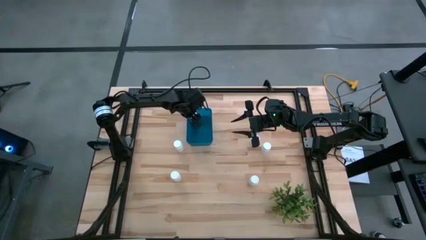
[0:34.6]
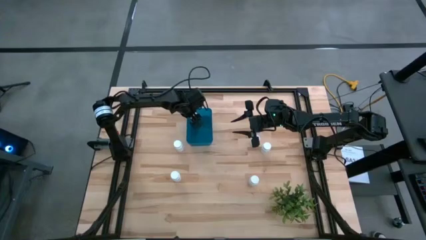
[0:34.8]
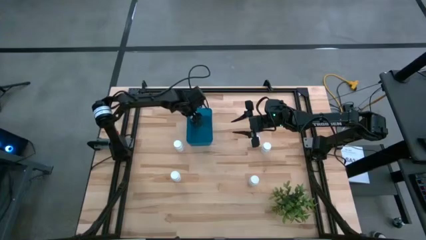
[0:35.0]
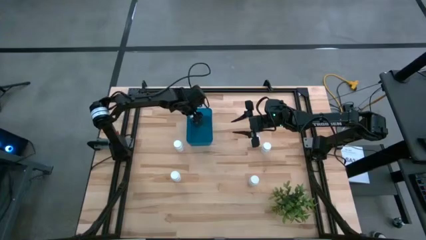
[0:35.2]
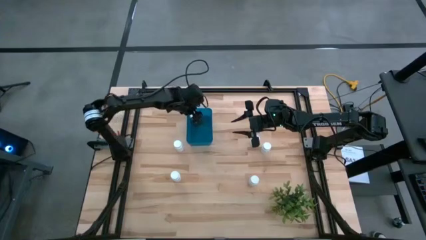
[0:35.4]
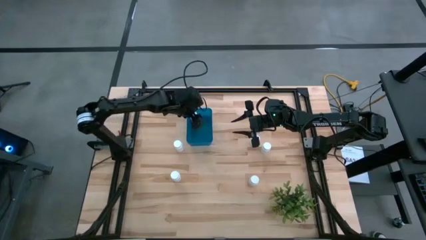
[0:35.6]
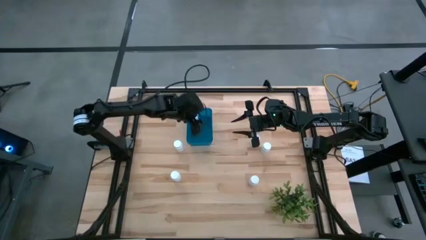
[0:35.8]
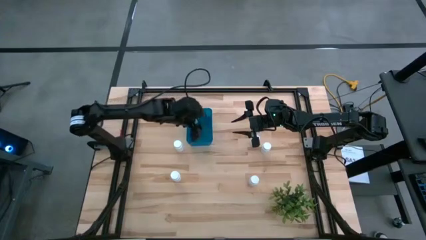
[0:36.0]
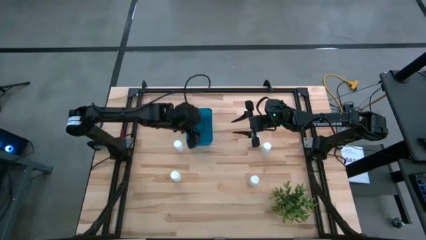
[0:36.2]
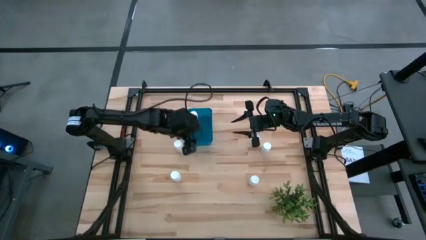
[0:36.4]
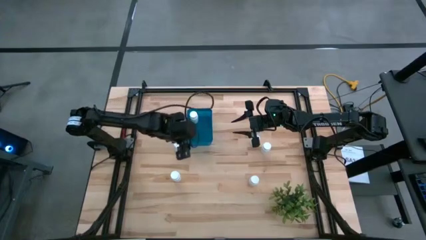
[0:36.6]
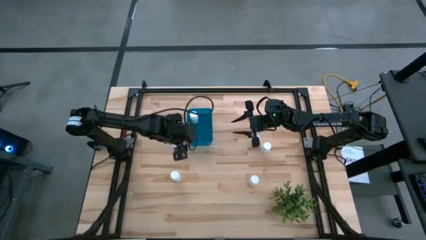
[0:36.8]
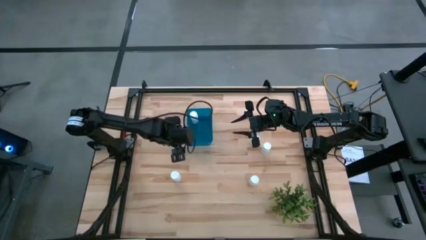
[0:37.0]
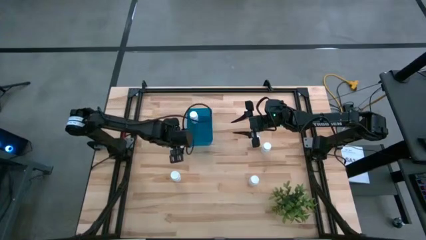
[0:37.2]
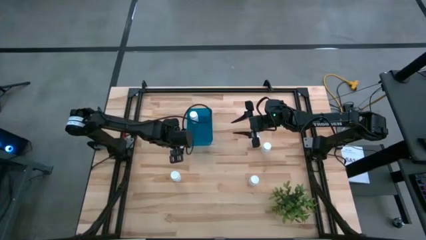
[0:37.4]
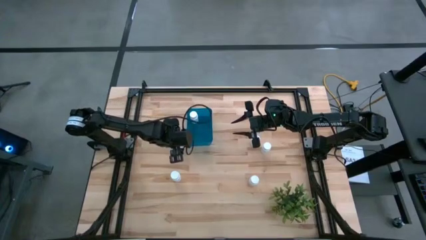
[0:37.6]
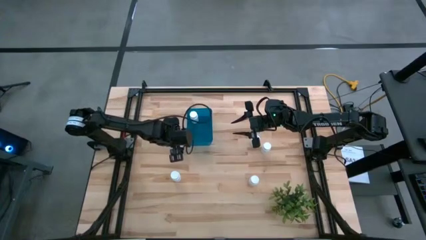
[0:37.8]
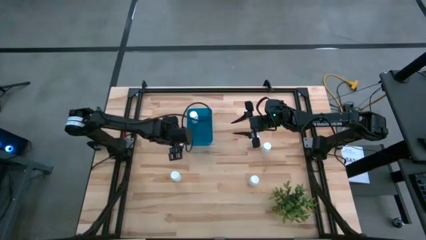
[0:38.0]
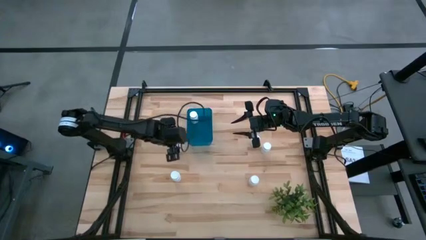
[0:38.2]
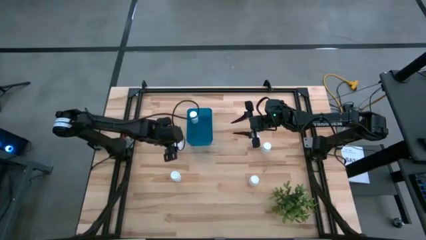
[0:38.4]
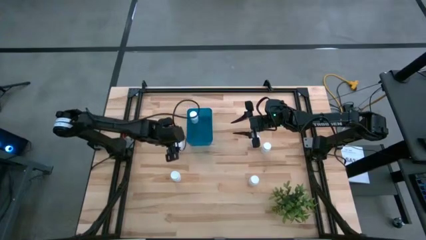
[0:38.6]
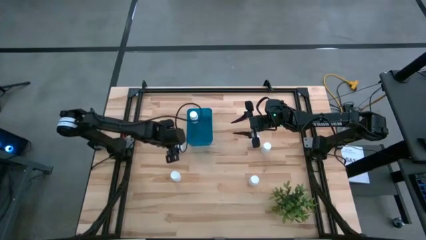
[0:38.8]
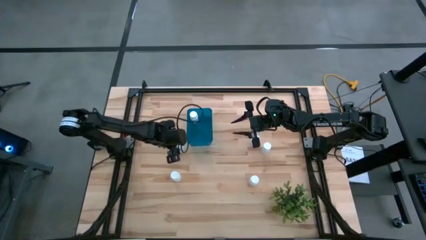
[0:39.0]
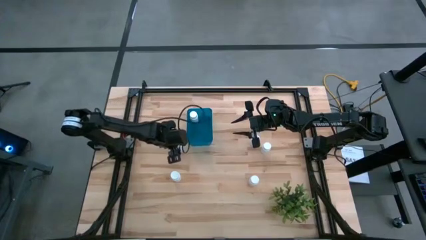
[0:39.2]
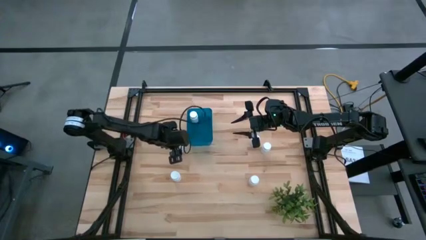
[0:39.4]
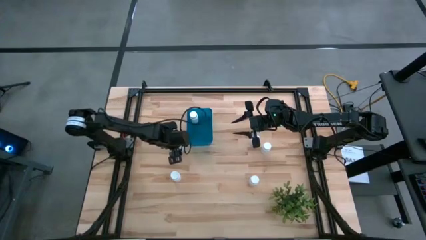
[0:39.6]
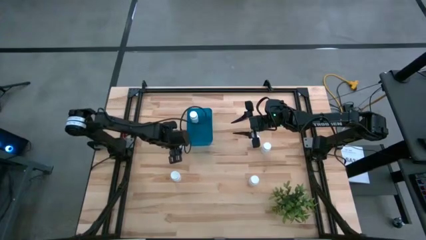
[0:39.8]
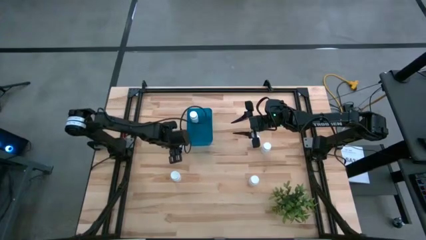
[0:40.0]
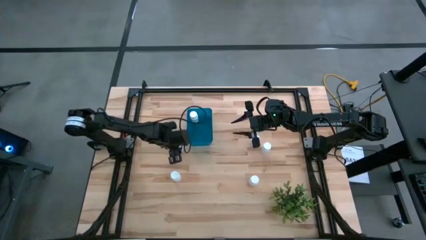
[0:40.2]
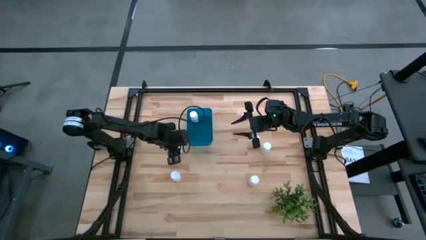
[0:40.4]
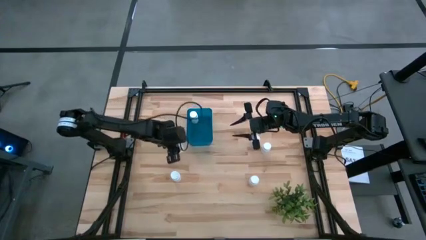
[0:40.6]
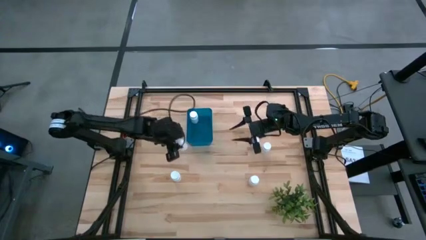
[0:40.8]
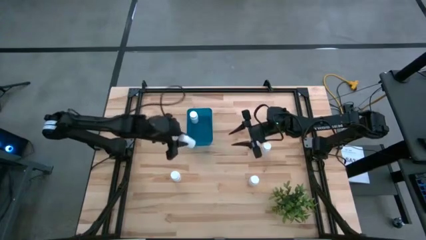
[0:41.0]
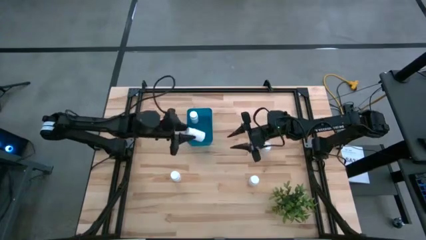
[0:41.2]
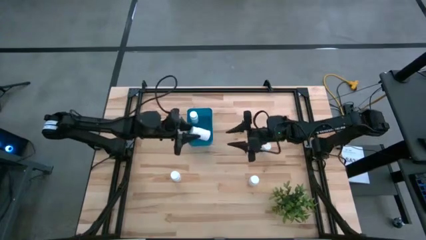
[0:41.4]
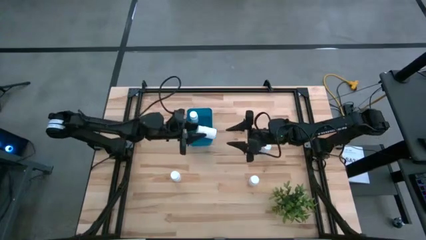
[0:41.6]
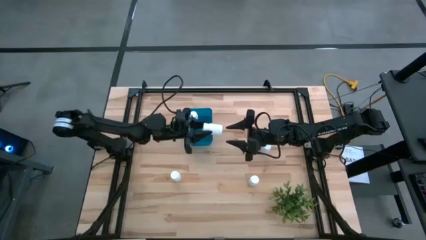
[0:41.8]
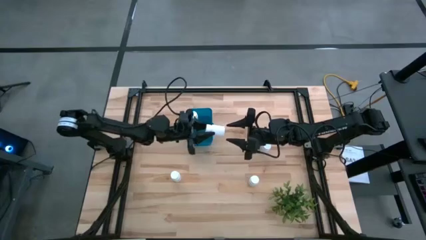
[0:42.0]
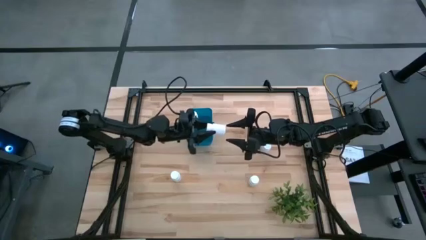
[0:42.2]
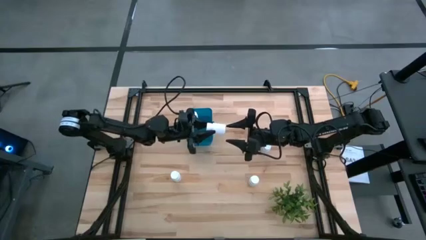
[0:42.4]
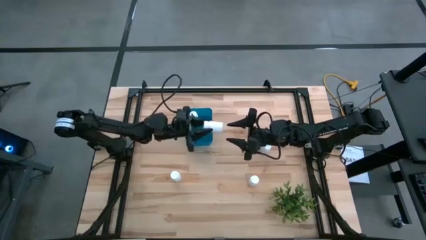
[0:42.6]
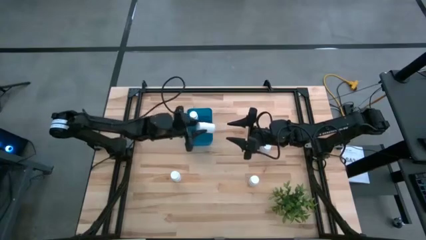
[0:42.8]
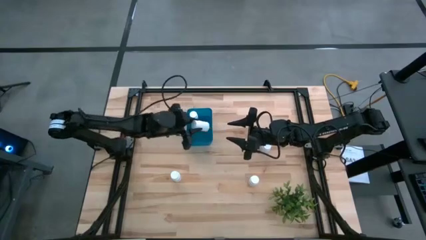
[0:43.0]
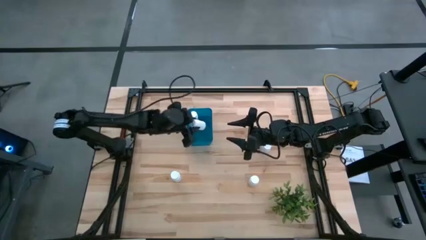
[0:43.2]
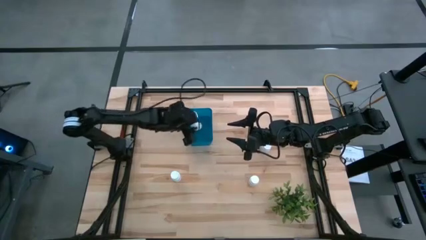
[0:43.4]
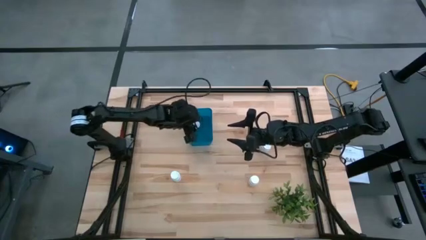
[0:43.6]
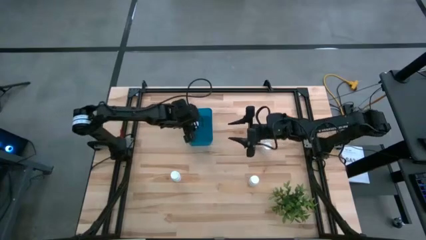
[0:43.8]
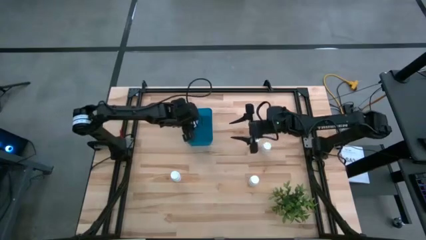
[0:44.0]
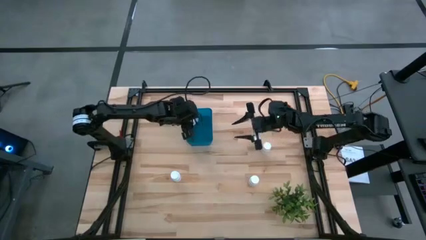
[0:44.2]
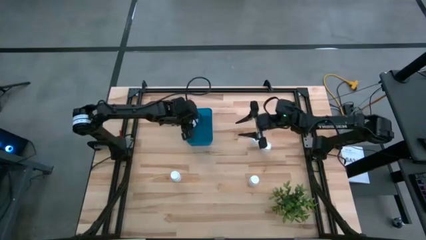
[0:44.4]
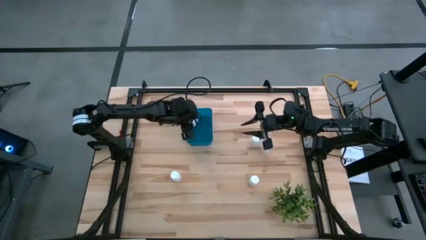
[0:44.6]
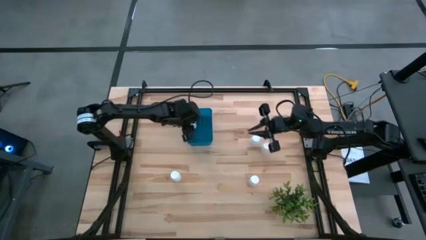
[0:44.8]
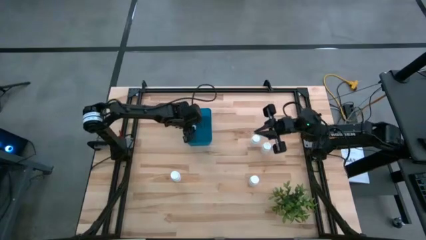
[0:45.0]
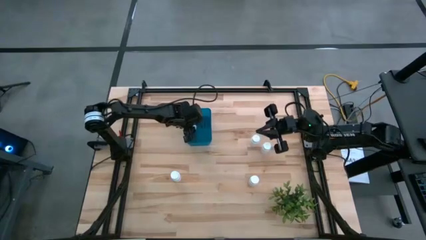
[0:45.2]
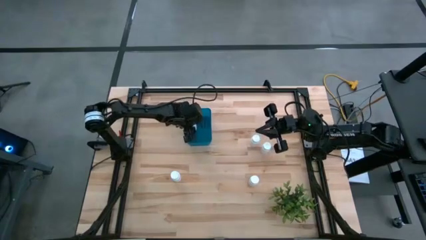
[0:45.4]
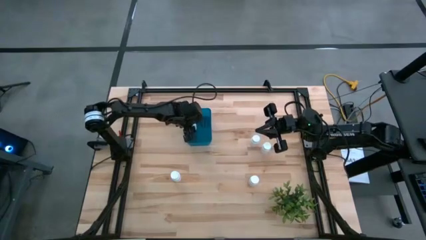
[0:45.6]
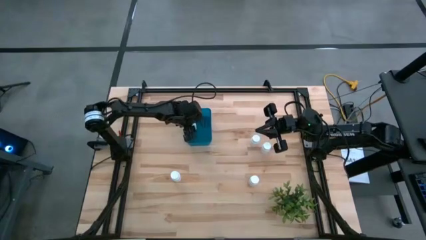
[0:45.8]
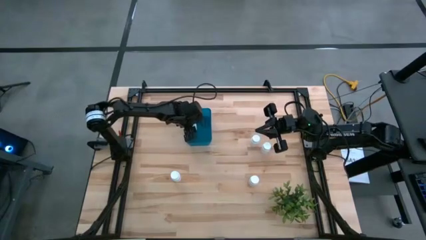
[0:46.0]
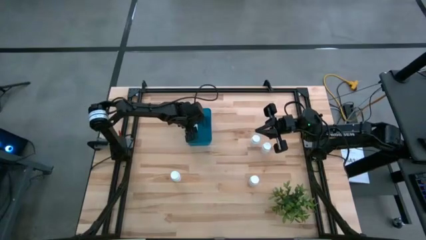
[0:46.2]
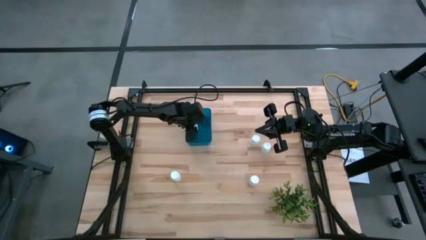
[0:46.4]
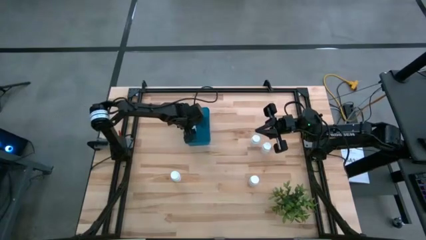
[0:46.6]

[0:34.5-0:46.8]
Task: Pick and place pill bottles into a basket
Put the white medicine bottle into the blue bin
